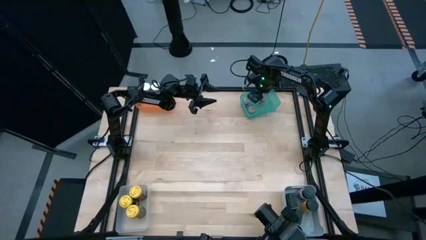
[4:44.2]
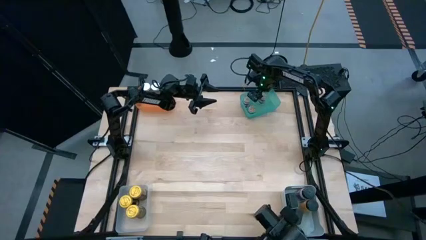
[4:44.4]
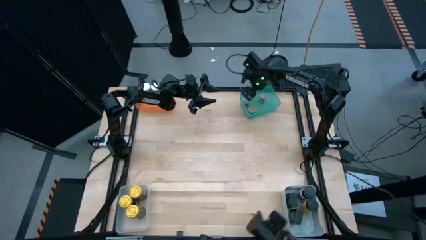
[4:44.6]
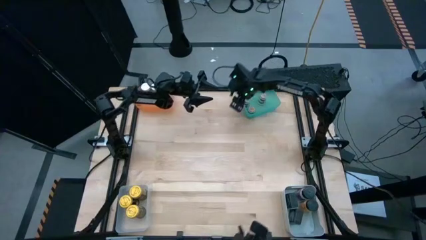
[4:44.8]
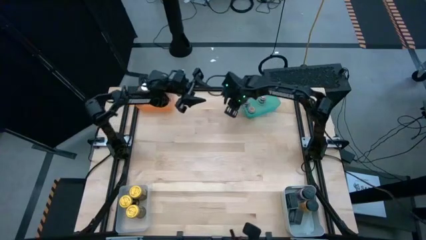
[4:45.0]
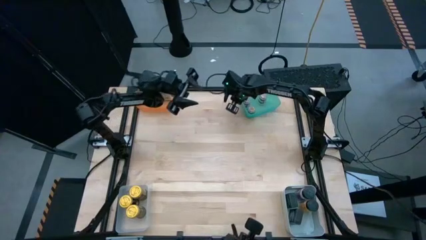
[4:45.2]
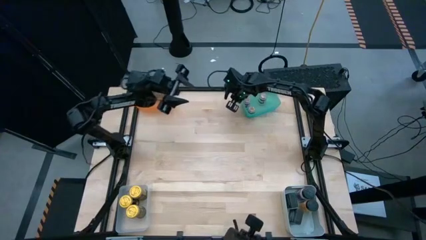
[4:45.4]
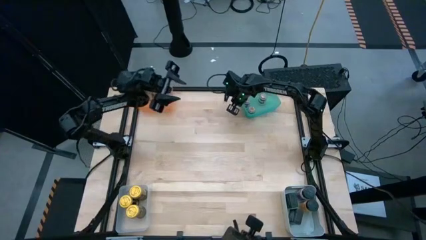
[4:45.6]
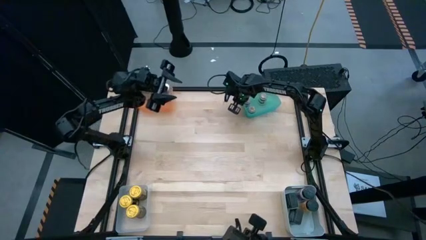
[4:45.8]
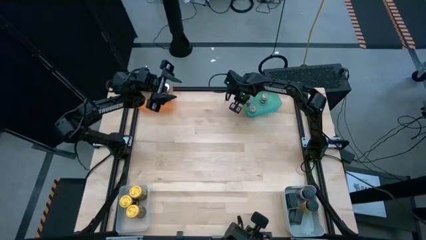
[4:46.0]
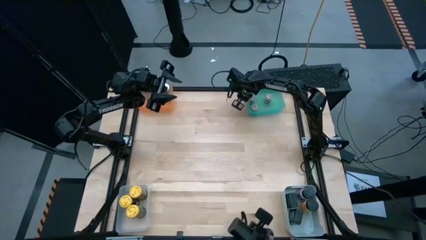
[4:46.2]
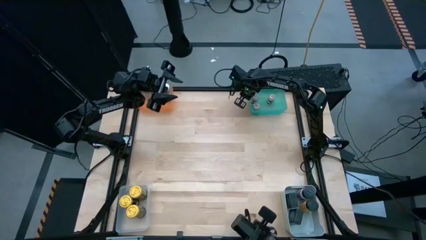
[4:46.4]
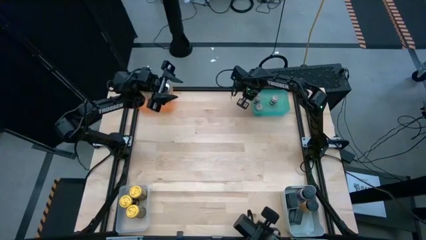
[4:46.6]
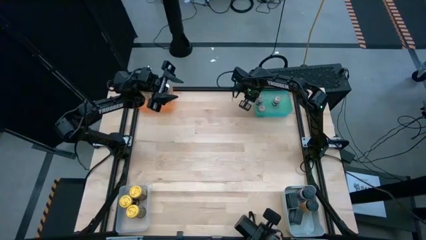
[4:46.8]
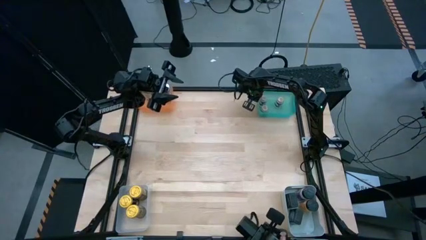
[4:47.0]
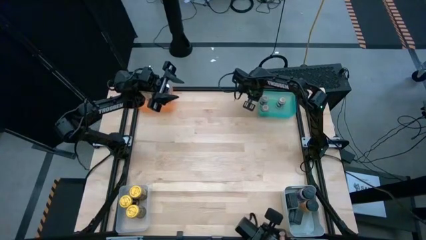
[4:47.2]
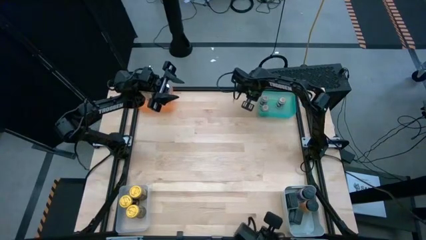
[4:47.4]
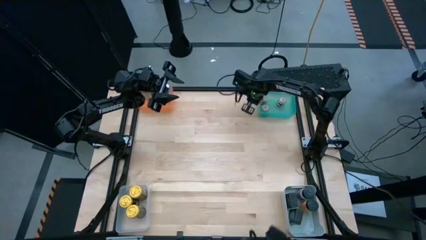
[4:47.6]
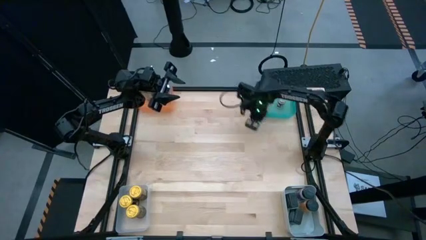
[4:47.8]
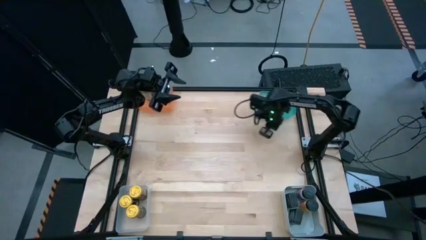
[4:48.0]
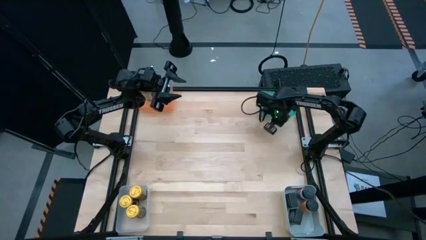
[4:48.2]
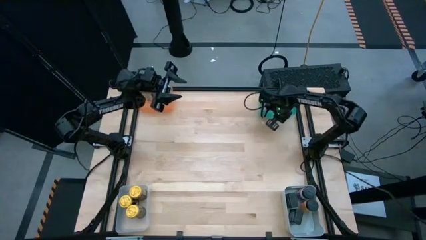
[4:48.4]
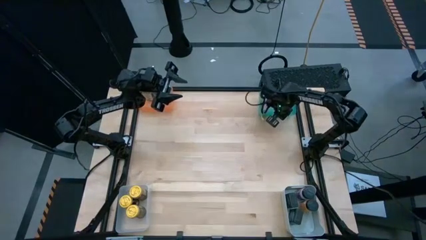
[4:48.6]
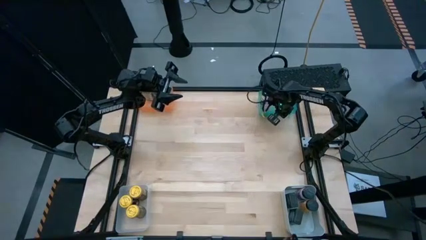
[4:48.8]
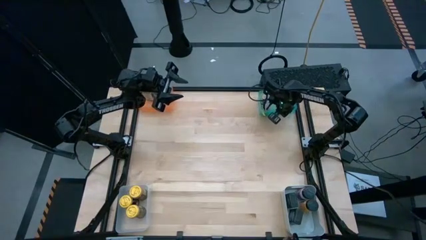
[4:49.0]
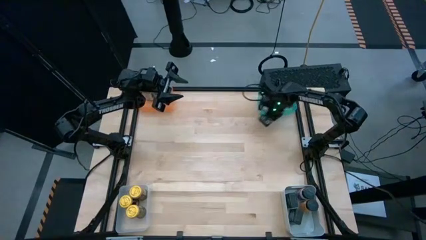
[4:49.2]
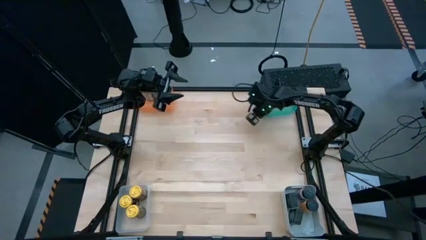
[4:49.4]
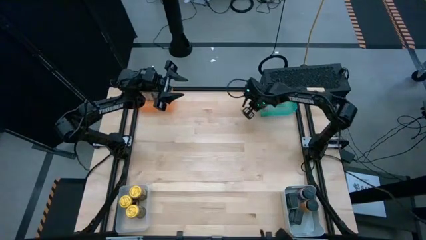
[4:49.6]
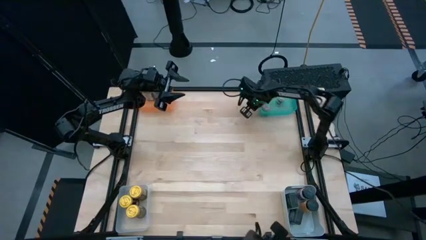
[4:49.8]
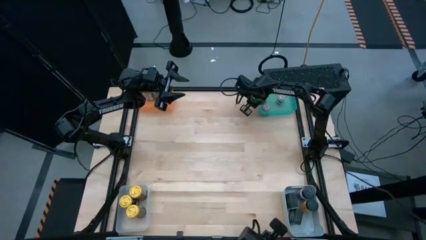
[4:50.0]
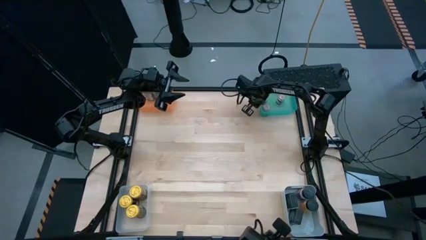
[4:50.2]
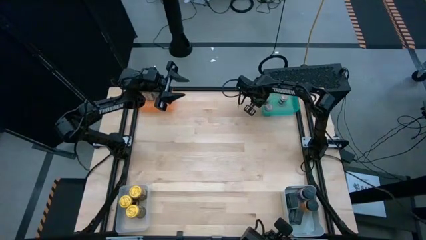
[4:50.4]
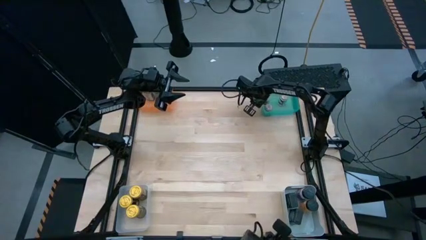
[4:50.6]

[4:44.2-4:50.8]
Task: Sort spices by type
Adjust the blue bin

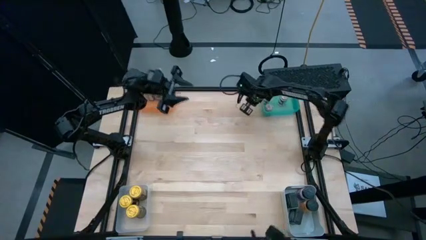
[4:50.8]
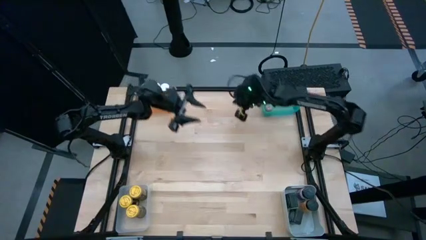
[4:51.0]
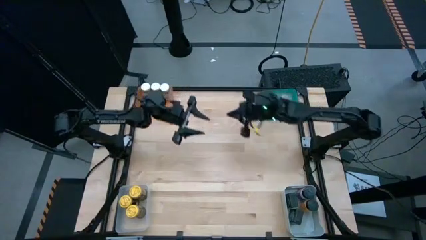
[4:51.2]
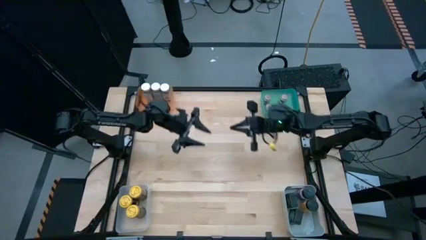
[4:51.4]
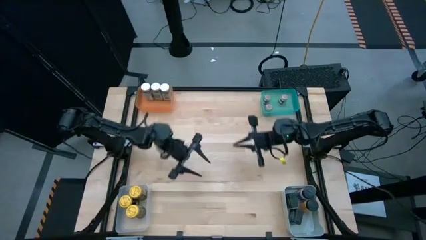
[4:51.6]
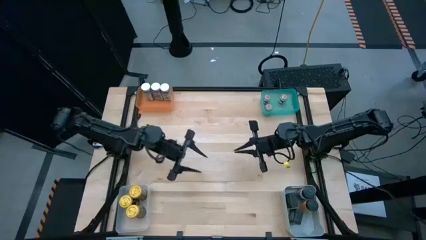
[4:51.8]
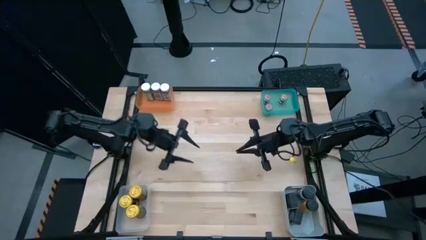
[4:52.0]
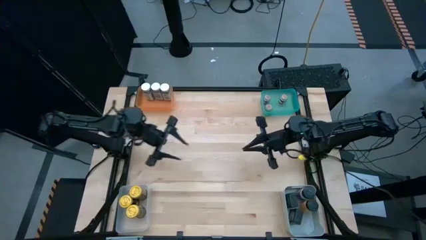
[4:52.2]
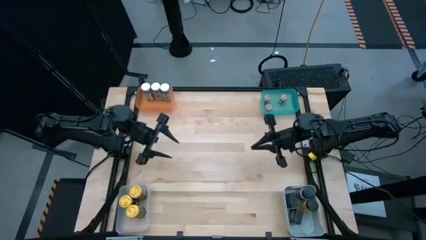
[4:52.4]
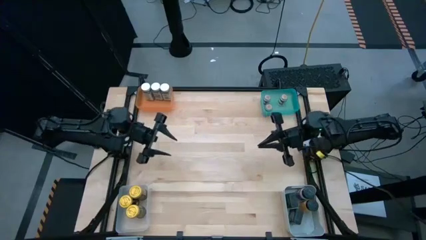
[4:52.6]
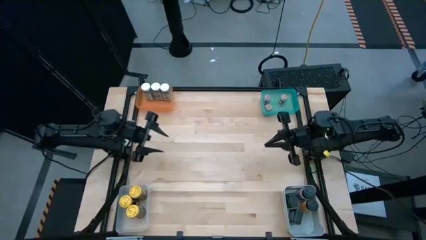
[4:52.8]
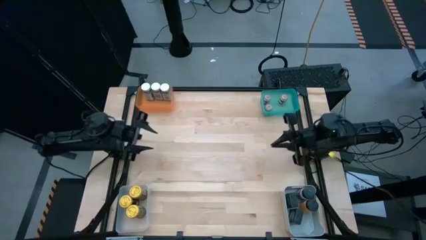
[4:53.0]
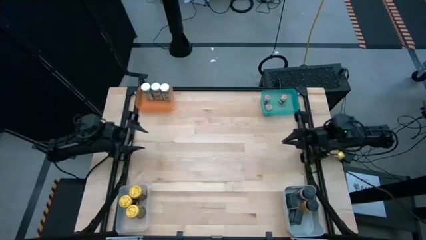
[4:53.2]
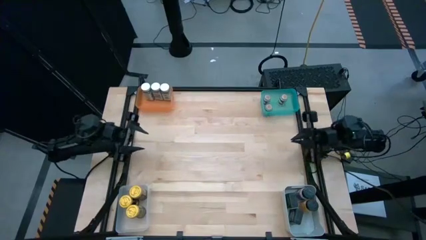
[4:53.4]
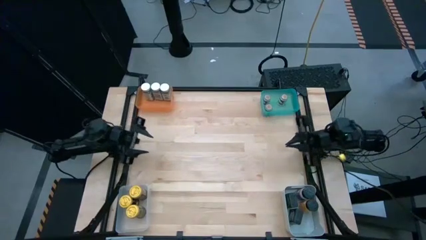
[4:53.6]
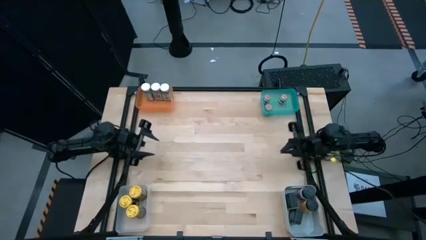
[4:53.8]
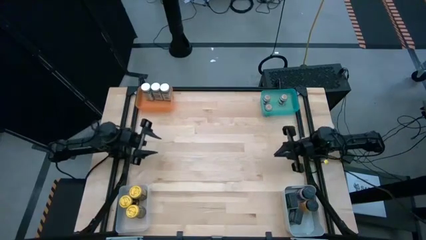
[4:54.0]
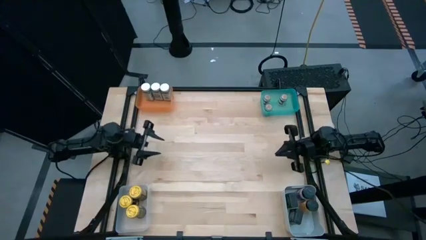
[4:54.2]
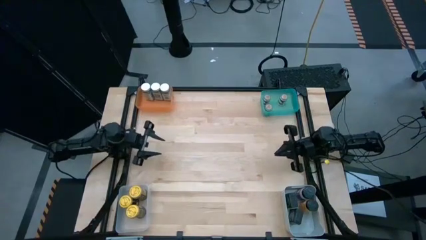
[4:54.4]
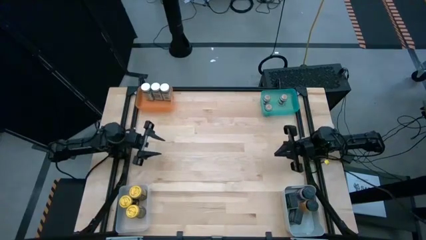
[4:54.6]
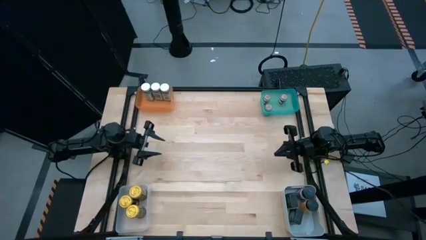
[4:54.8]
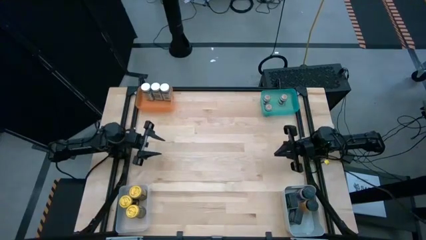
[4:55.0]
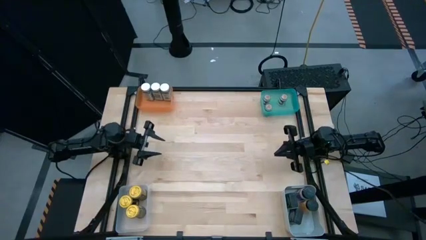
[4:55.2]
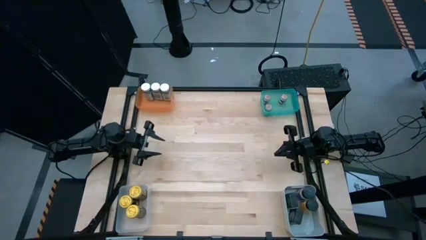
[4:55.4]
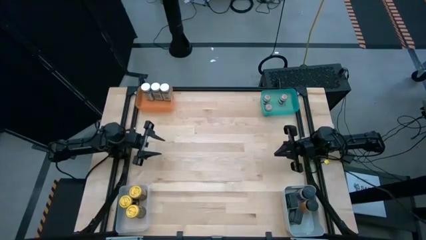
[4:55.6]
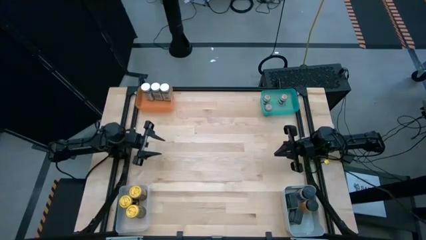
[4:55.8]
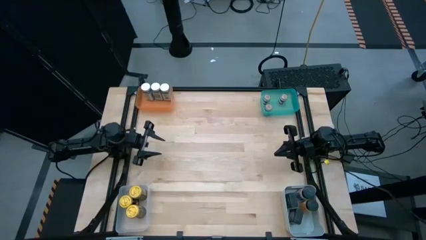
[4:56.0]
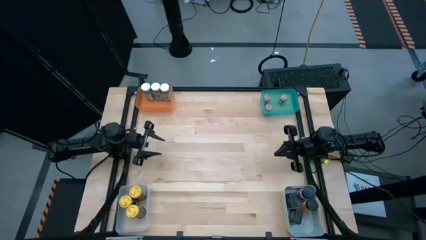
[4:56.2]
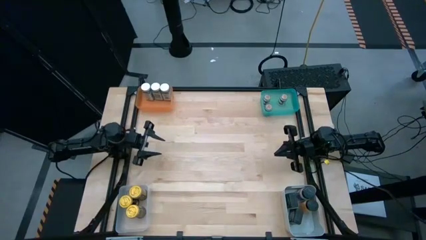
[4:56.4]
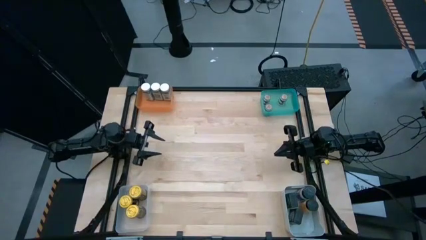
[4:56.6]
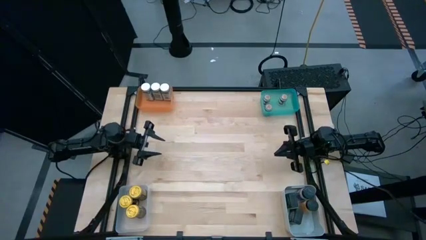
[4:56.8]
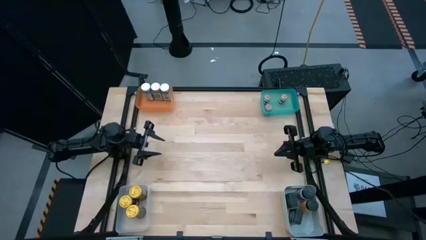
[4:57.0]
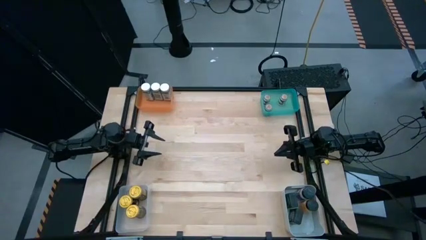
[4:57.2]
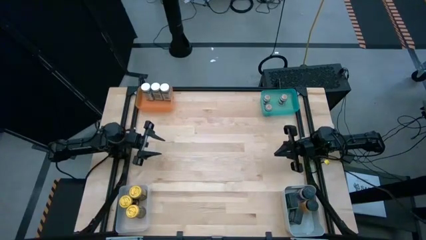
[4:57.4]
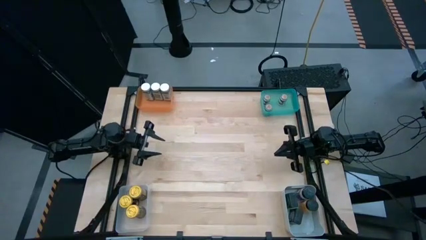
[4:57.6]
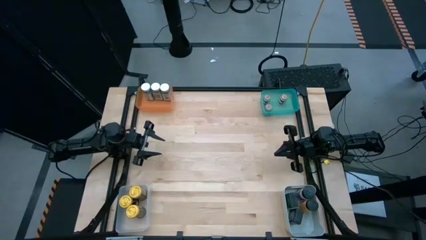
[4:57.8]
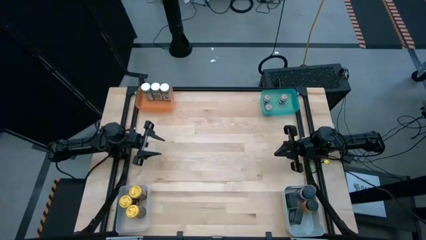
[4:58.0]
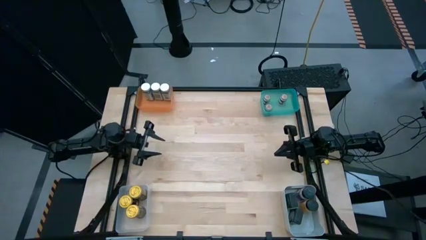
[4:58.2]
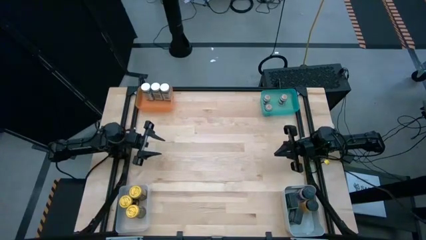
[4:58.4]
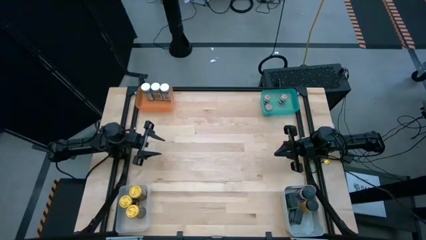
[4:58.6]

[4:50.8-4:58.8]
Return to Home Position

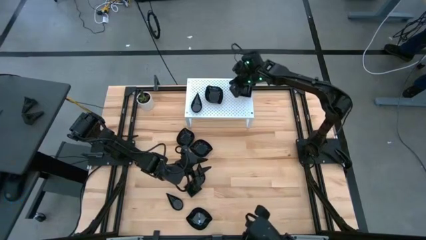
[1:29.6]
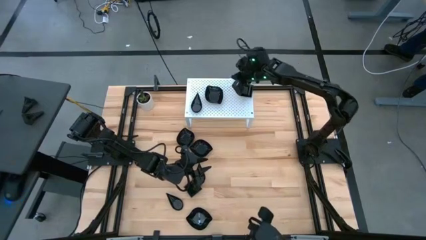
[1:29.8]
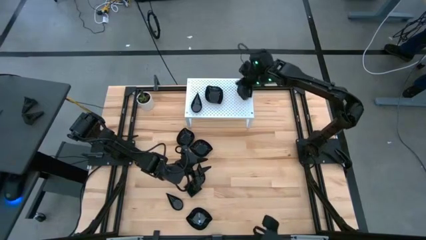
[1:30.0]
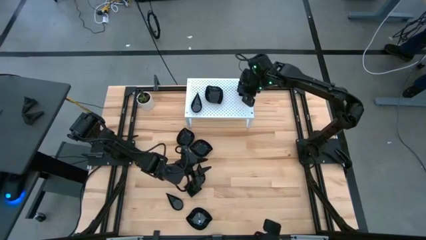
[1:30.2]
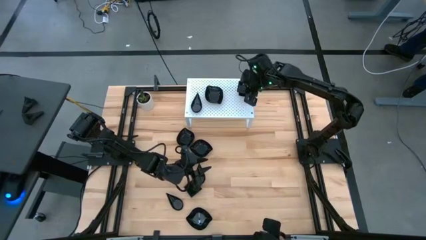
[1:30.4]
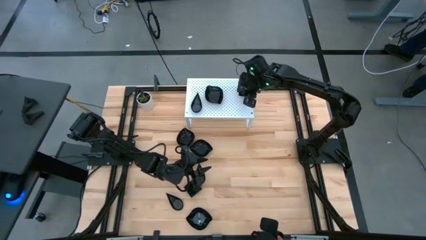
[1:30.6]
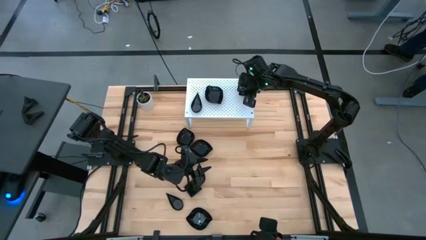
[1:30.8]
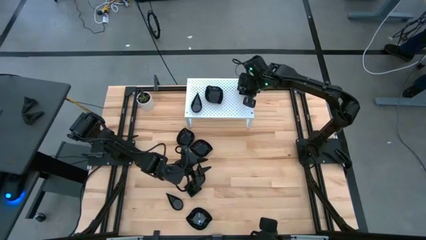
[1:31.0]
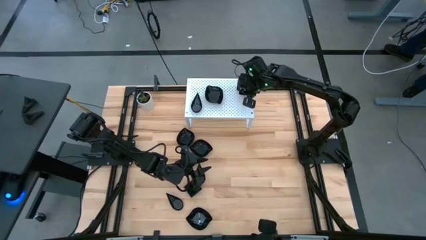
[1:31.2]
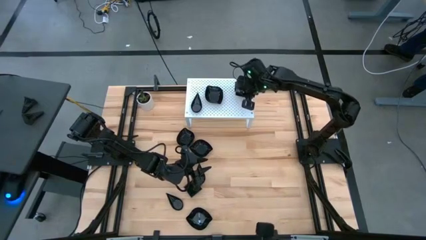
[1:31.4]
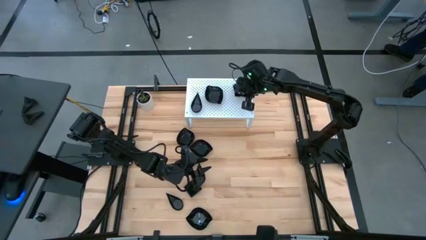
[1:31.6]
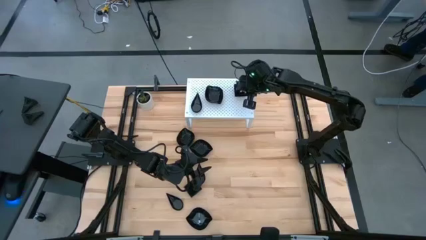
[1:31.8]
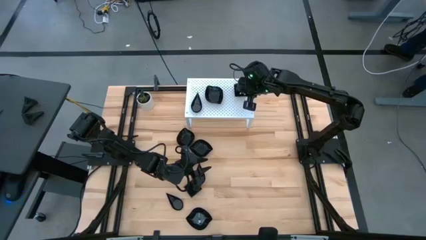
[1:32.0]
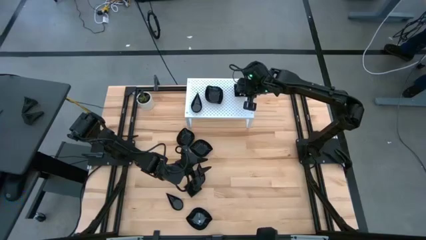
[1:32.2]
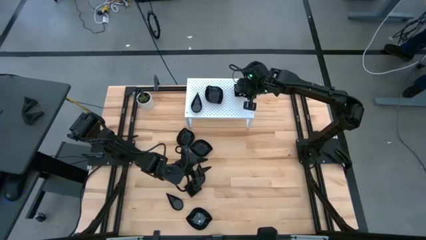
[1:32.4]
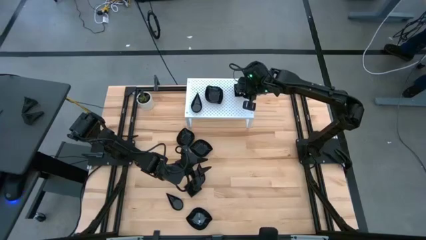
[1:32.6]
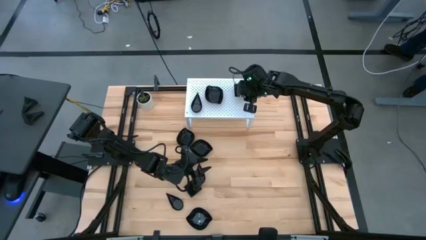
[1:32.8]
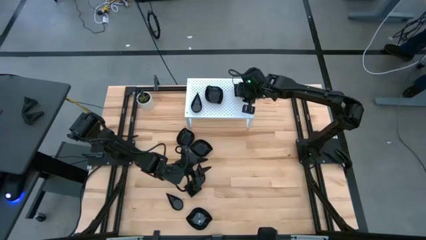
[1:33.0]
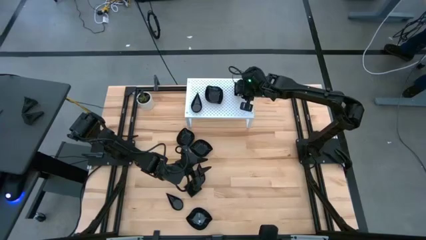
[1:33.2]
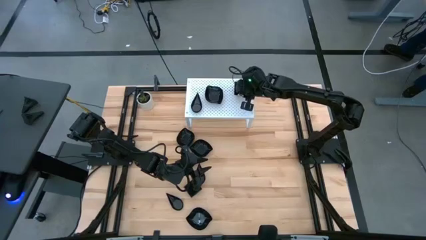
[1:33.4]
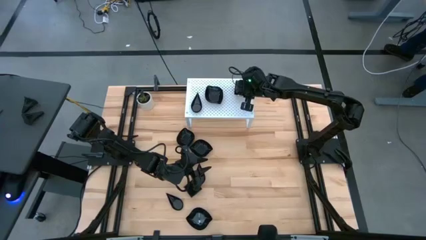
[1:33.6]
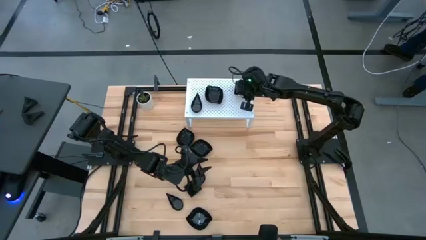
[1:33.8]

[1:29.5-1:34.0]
Task: Pick & Place Mini shaped plates
Stack the black square plate on top of the other black square plate on the shelf
